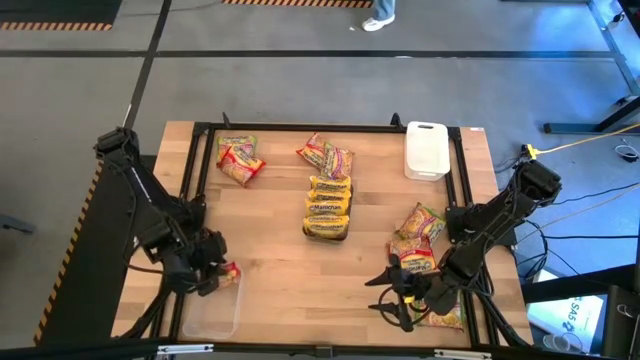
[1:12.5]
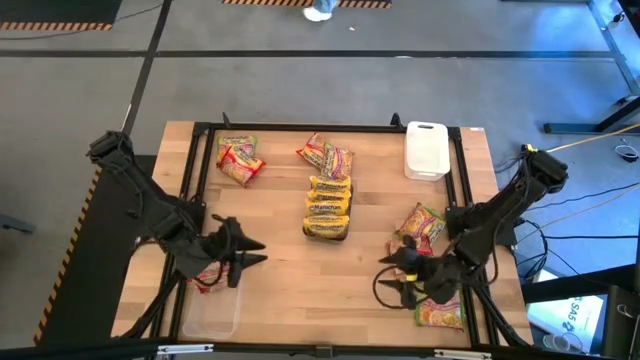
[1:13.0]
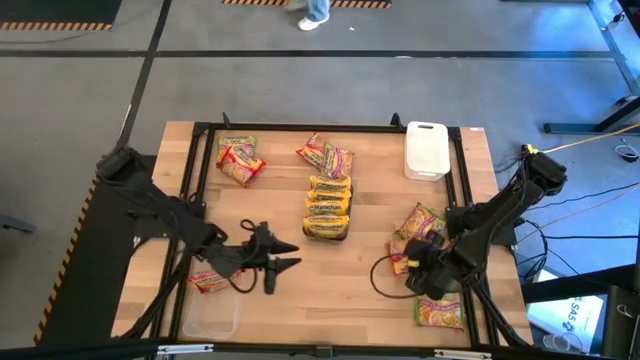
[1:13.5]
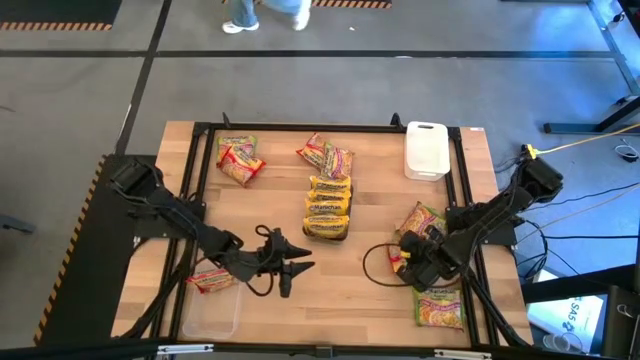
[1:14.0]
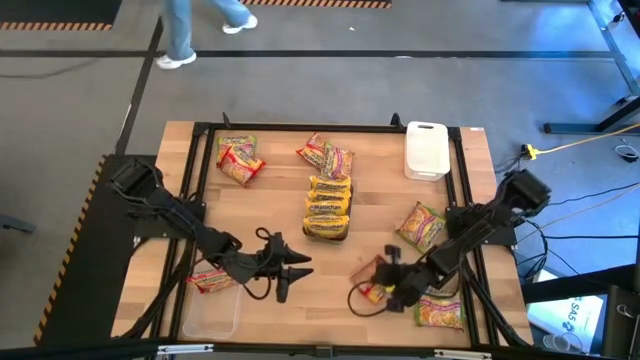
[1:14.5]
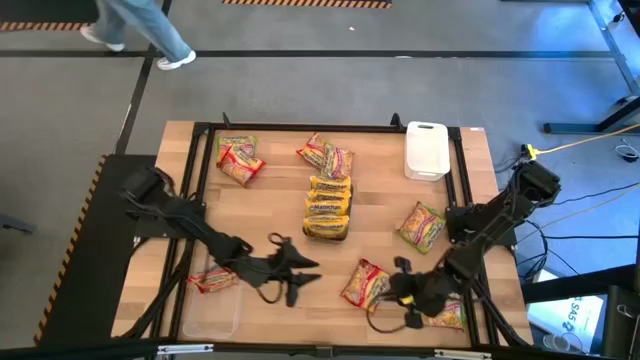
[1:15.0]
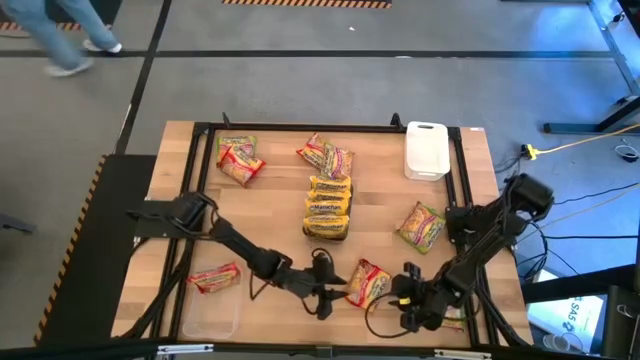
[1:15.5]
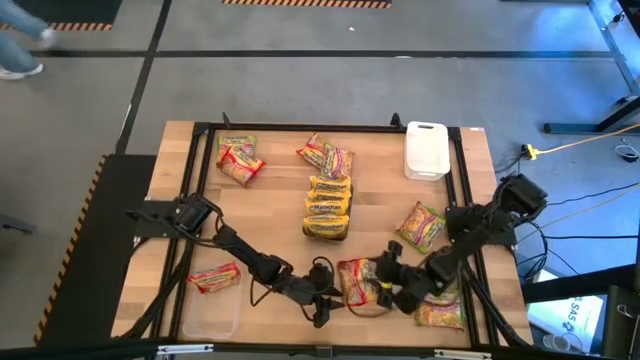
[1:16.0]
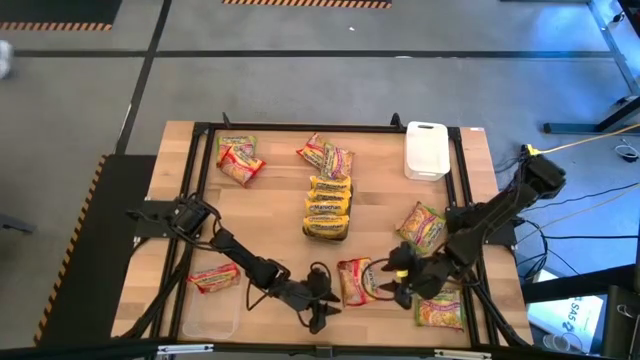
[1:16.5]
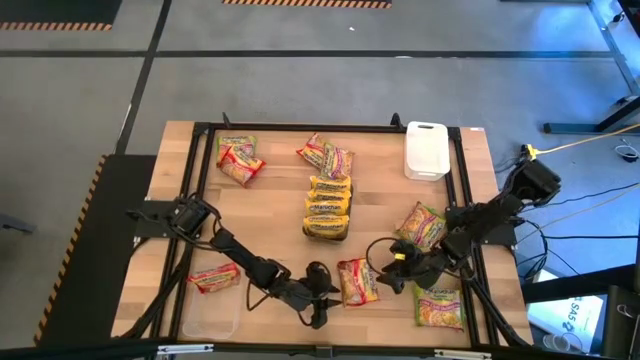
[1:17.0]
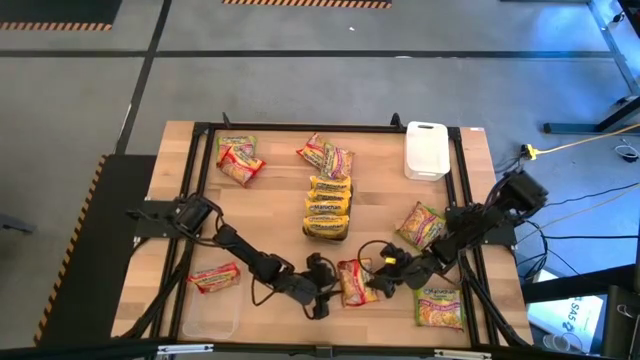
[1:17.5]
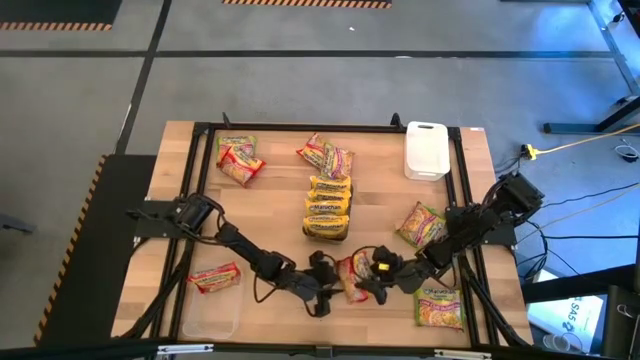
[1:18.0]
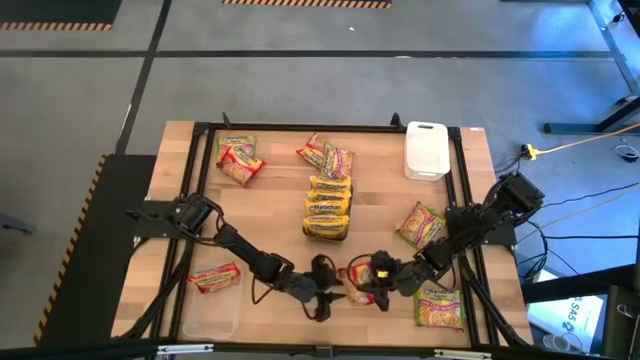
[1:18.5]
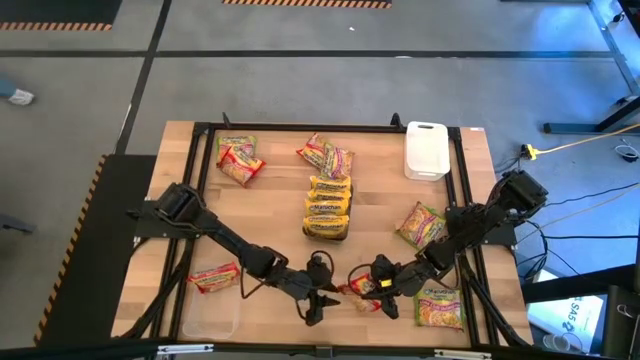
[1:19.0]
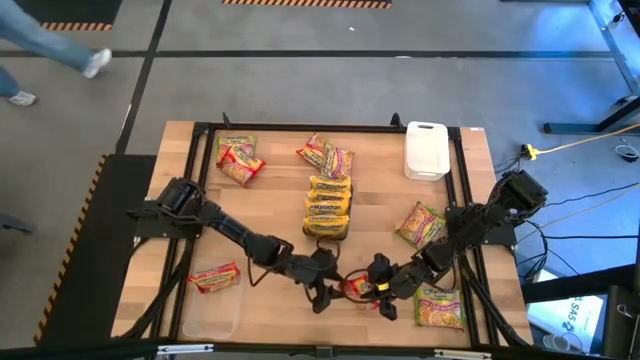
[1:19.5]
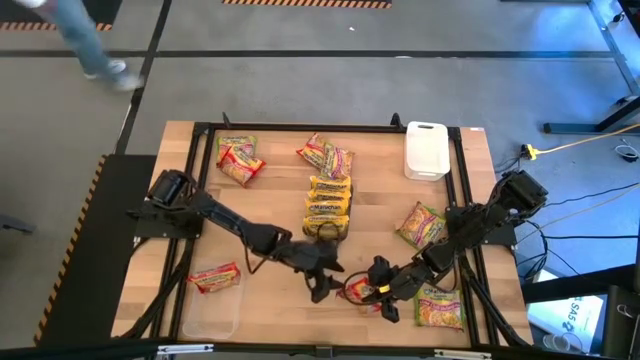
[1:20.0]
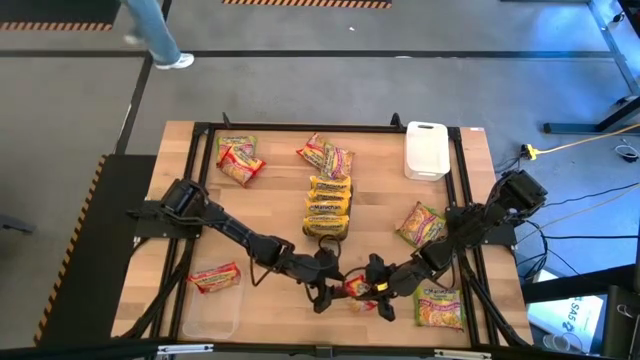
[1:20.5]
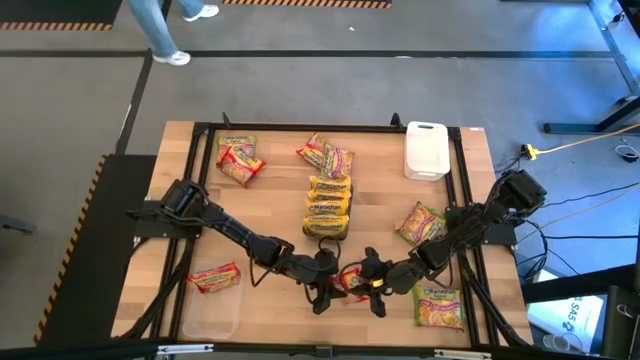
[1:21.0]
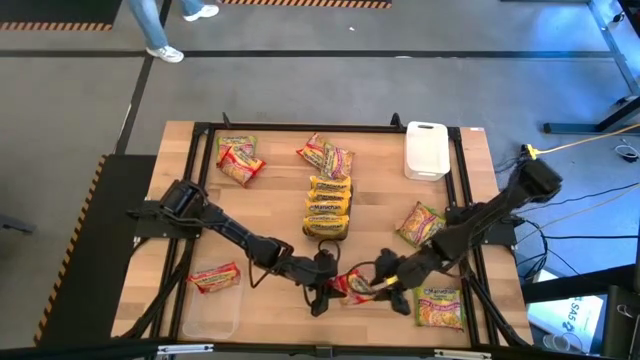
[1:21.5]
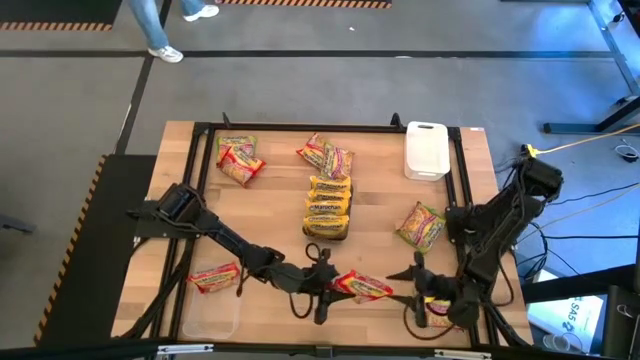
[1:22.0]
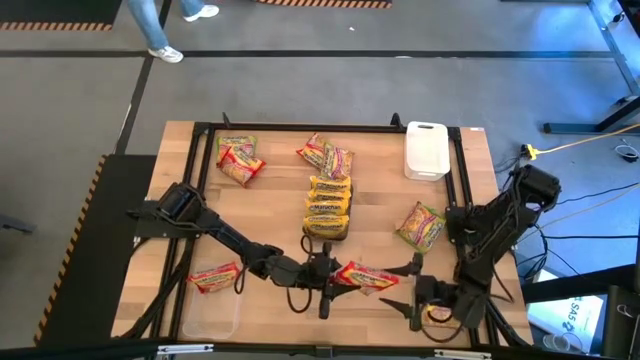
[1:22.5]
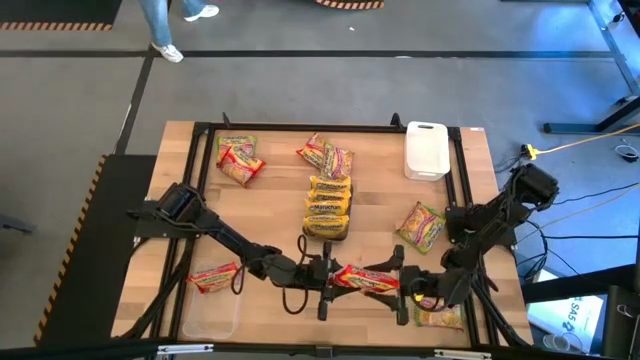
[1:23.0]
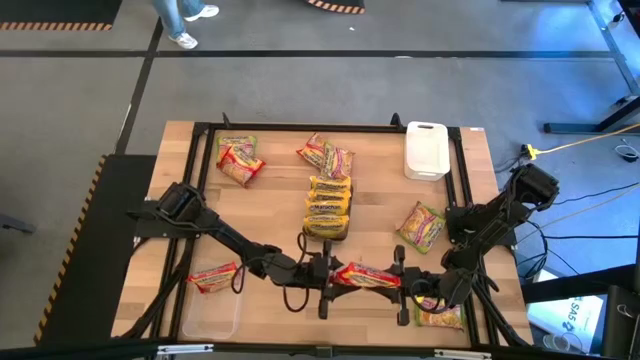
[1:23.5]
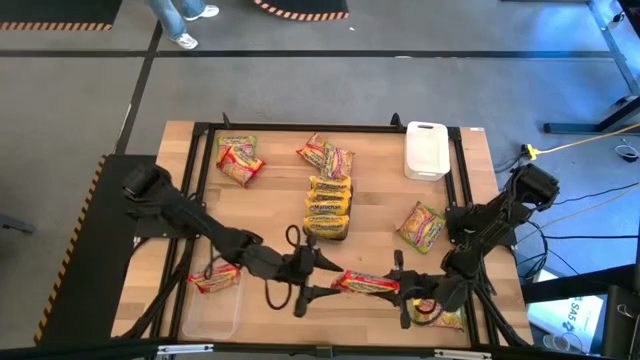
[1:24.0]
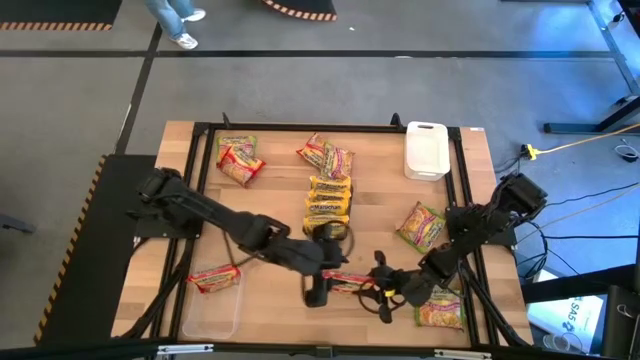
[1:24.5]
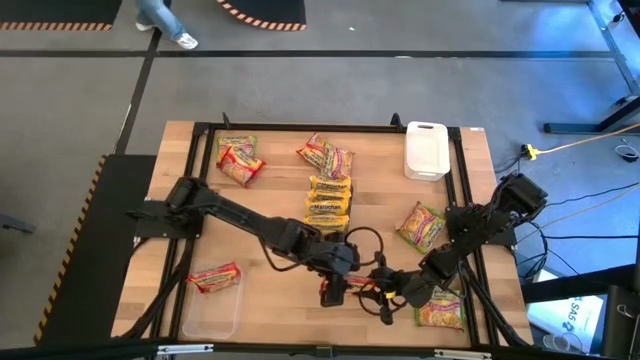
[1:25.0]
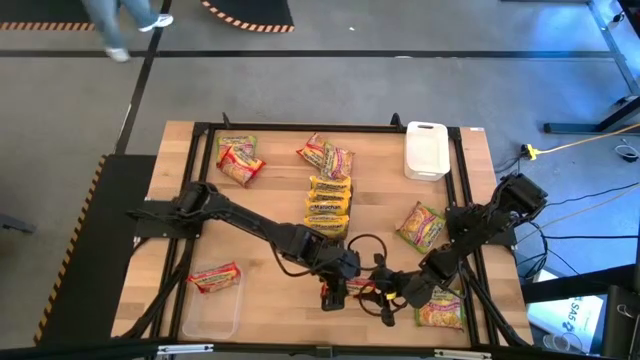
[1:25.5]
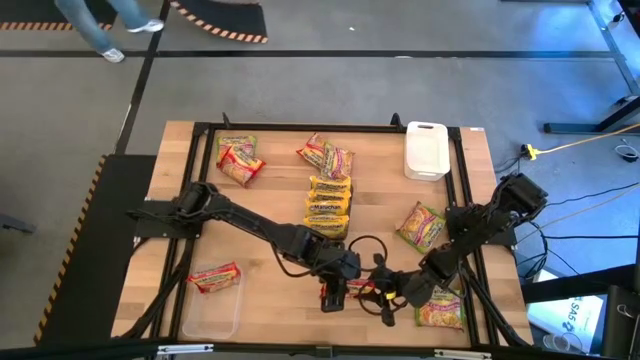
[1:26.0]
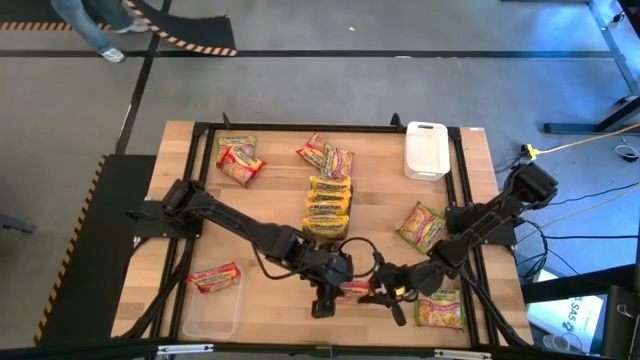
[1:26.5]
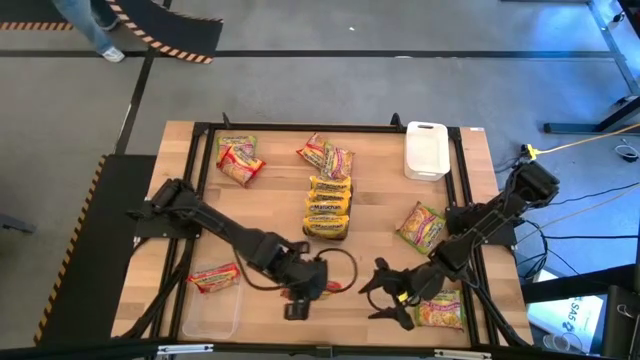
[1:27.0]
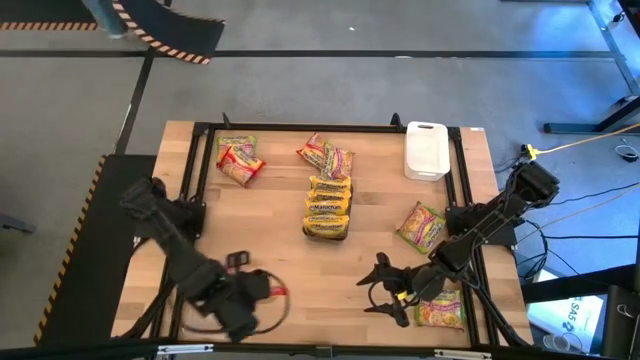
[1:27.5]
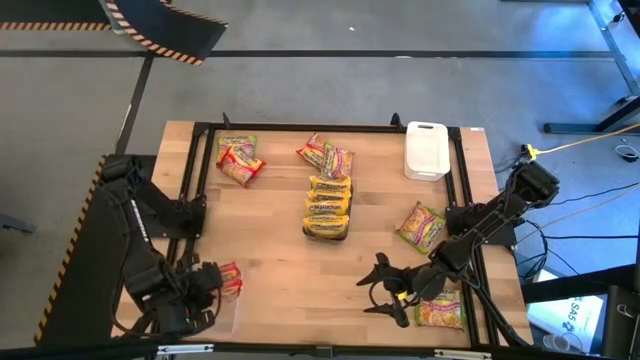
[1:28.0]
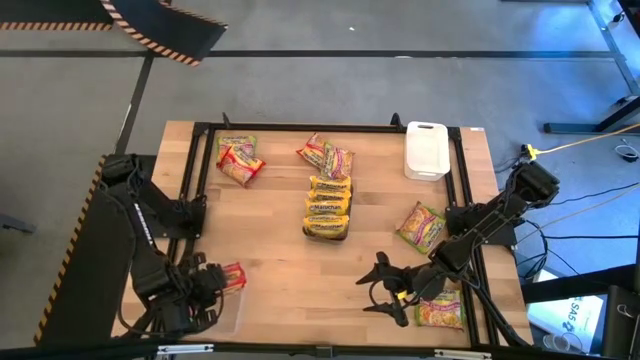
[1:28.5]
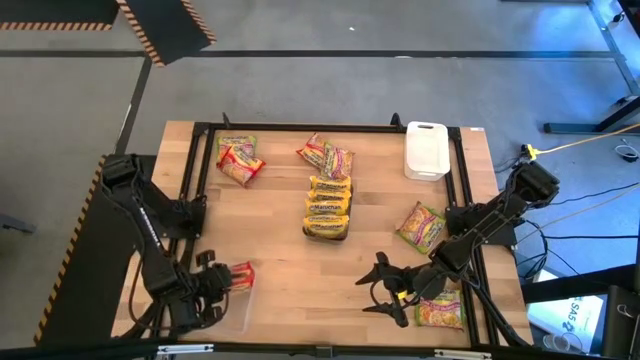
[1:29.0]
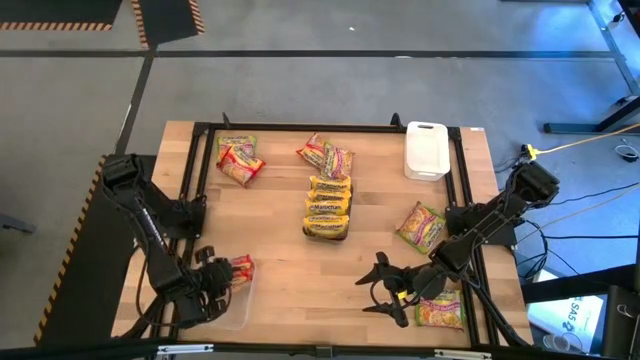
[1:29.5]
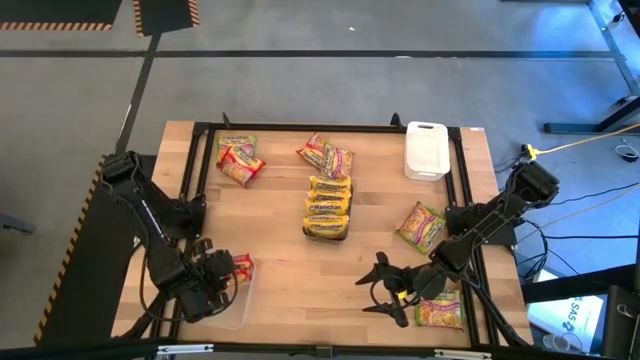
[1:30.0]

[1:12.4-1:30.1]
Task: Sort Maruchan noodles
Put the red noodle pack into the transparent bin

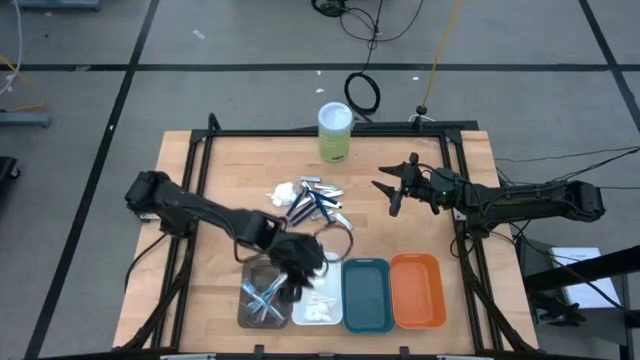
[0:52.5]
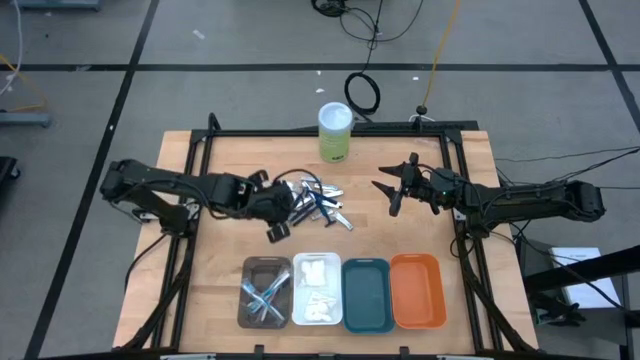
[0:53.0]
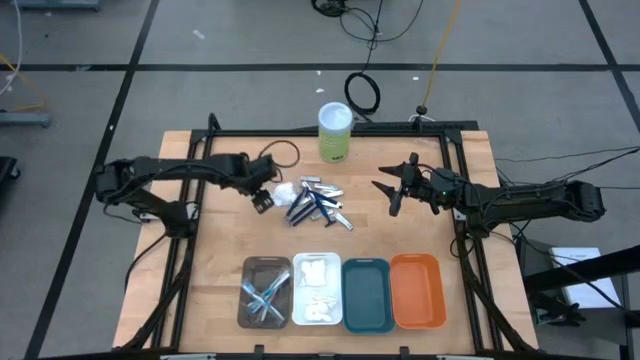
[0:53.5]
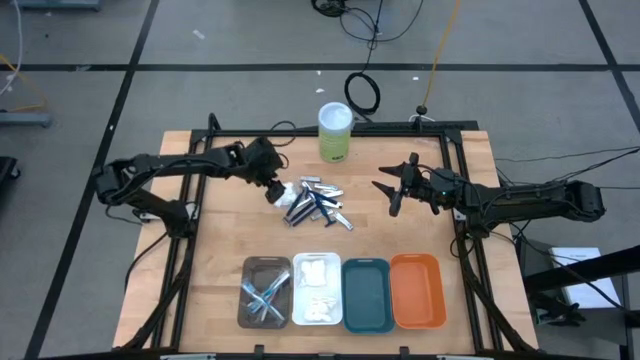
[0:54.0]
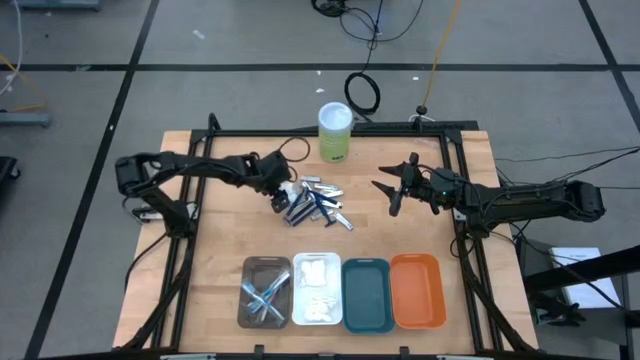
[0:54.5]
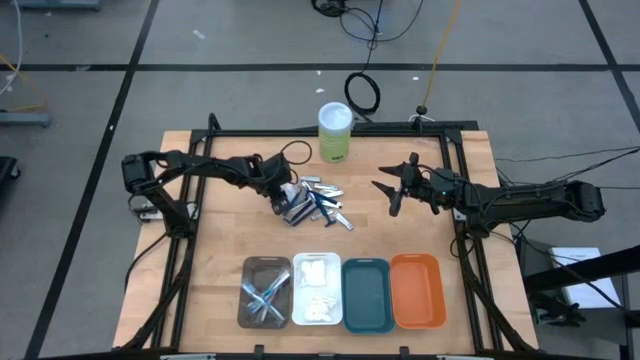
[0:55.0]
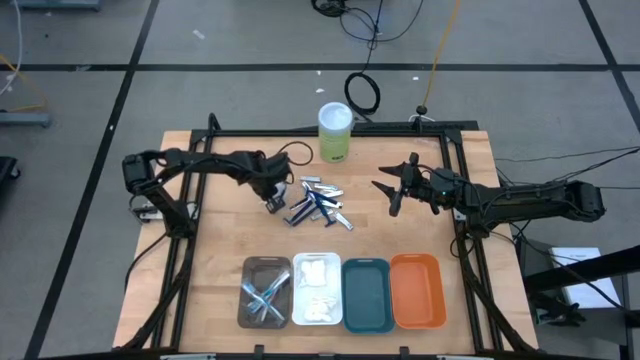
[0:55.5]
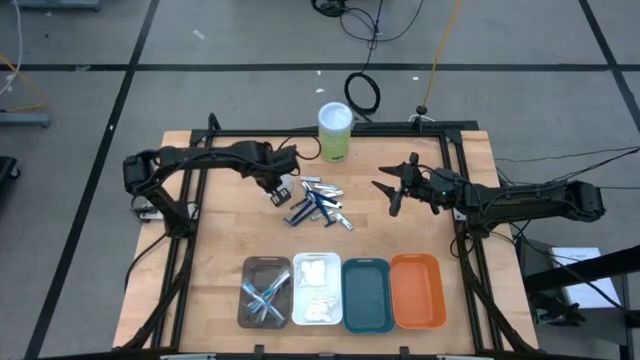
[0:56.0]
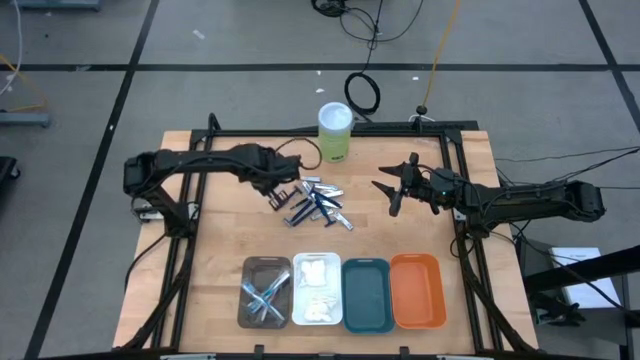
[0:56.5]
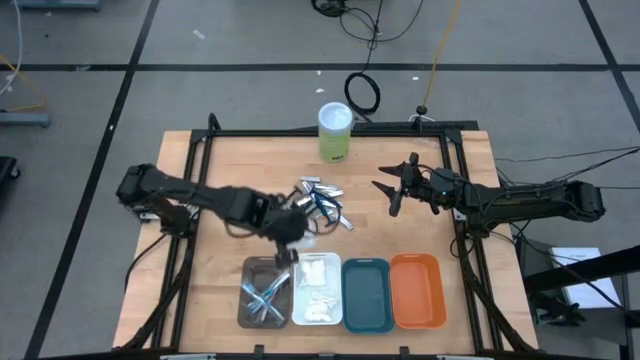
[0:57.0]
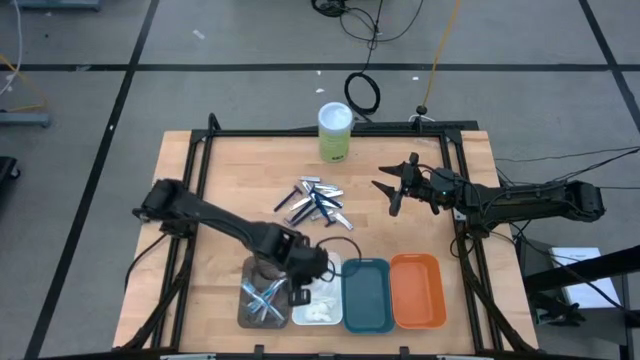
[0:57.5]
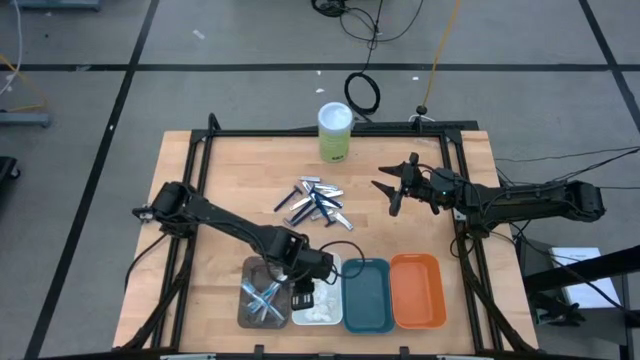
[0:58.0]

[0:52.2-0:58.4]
Task: Pick & Place Travel size toiletries
Put the white cotton pack into the white bin
